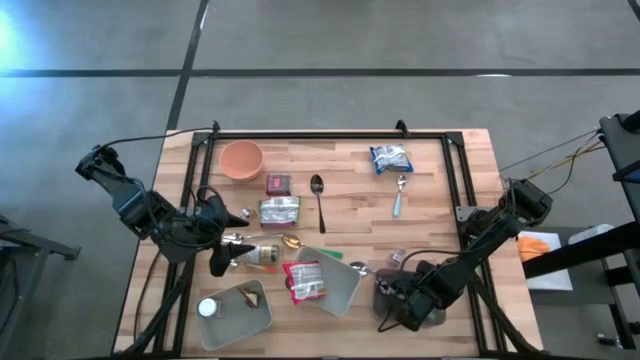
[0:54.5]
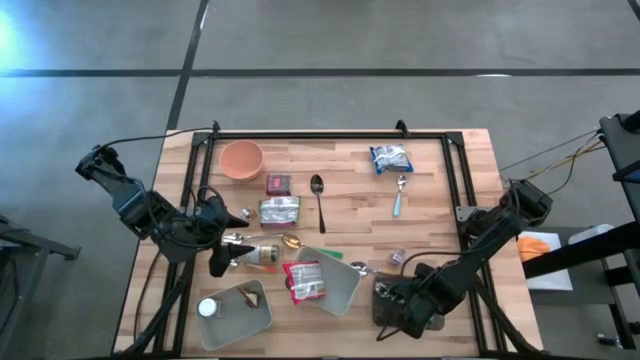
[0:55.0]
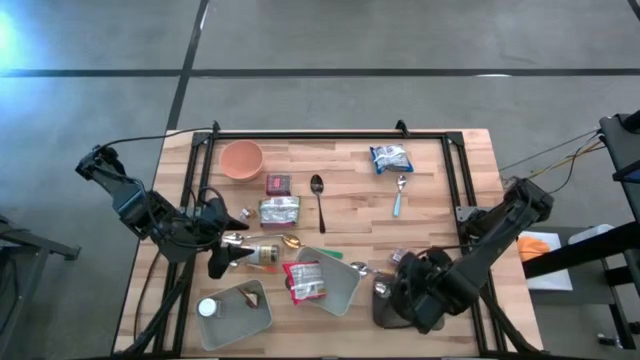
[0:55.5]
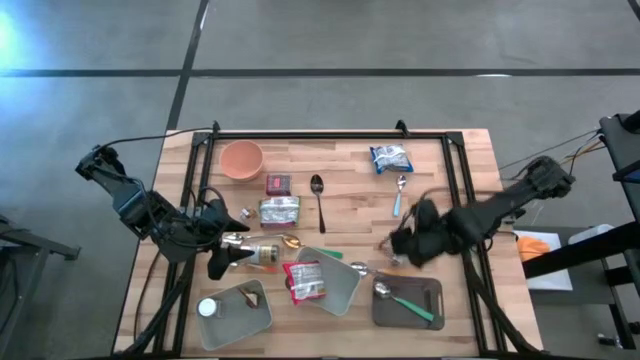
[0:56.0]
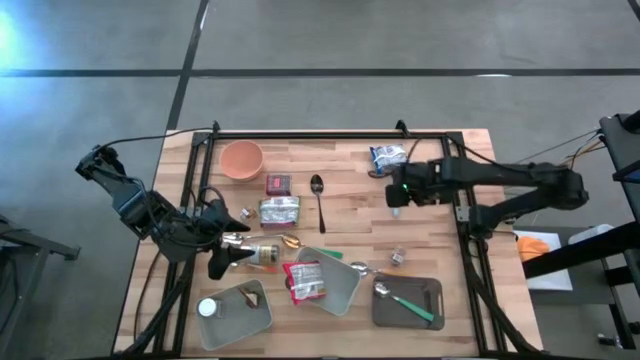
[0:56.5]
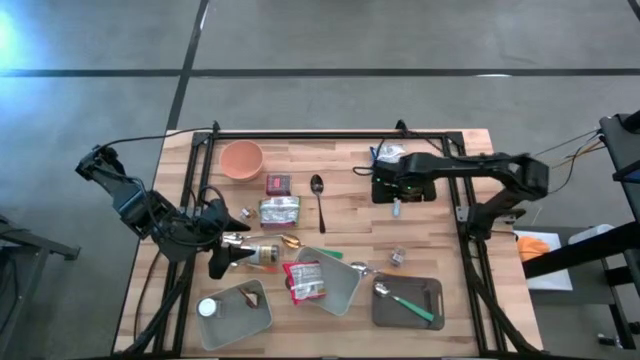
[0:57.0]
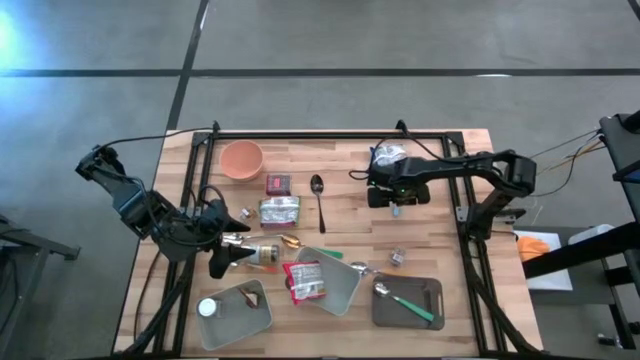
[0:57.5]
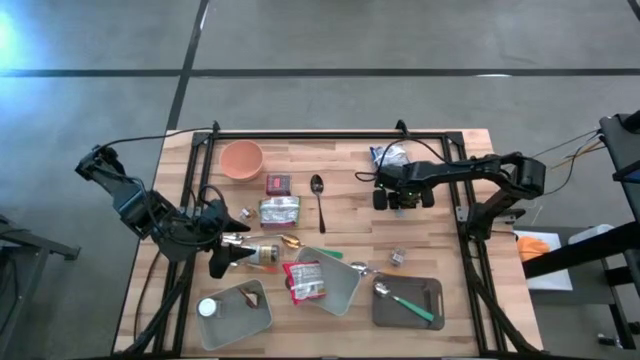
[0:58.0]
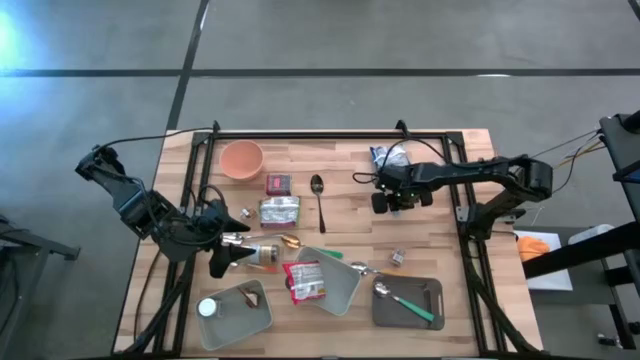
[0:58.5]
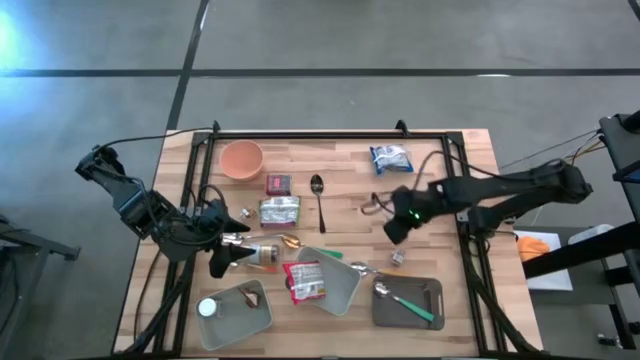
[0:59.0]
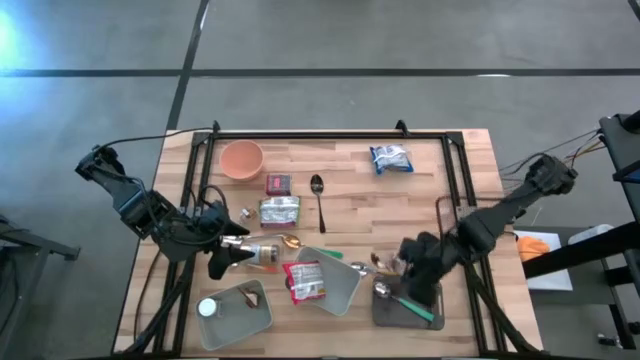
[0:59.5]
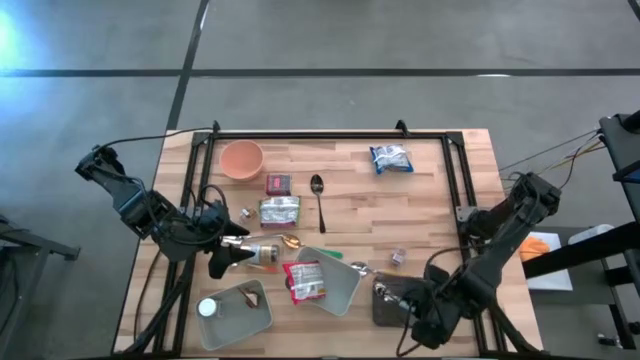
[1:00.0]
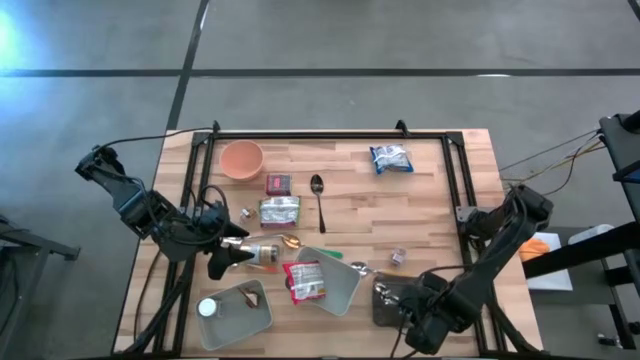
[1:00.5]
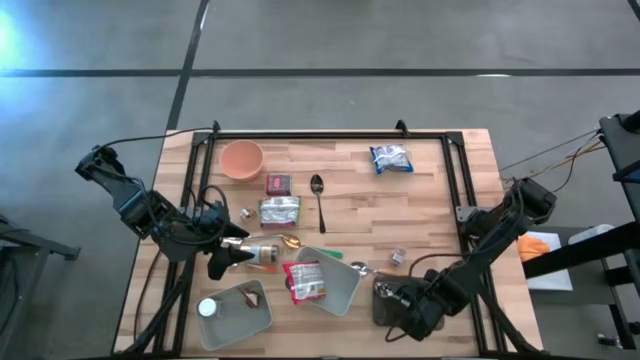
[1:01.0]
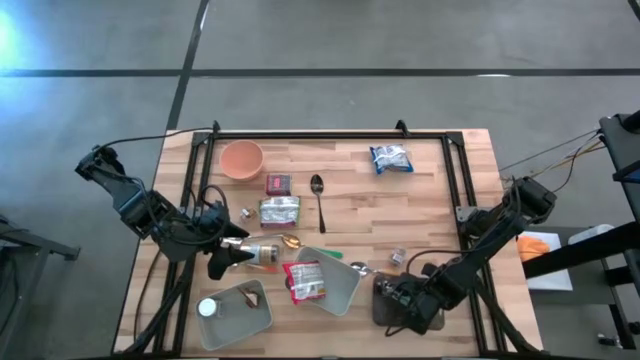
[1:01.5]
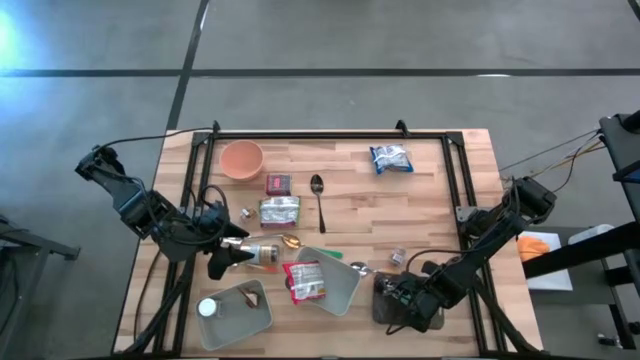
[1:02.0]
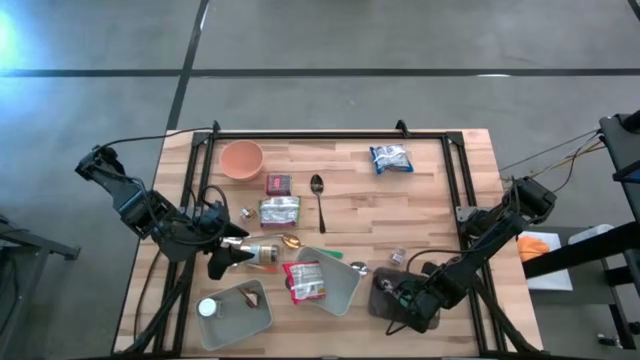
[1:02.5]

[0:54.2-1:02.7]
Put the light blue spoon into the black bin

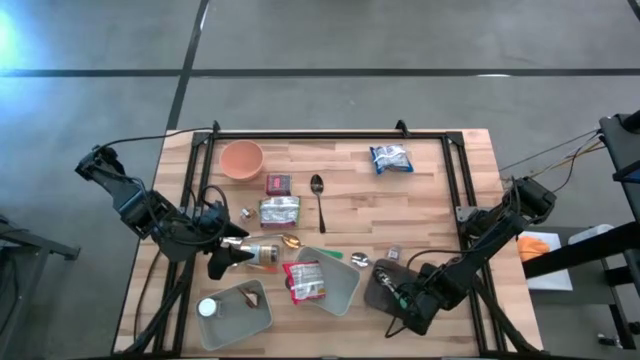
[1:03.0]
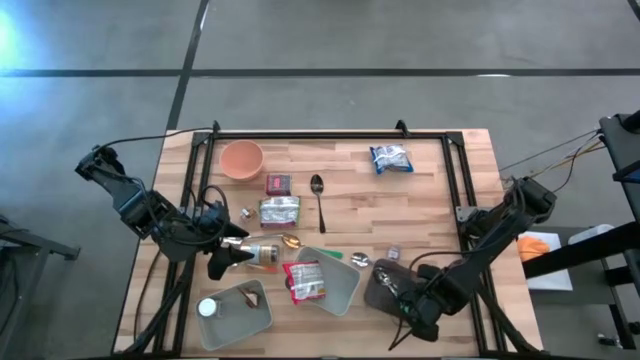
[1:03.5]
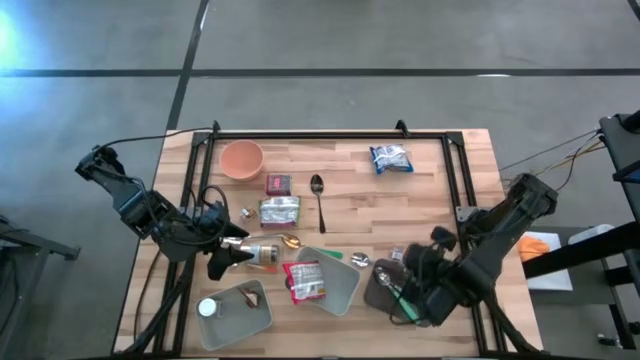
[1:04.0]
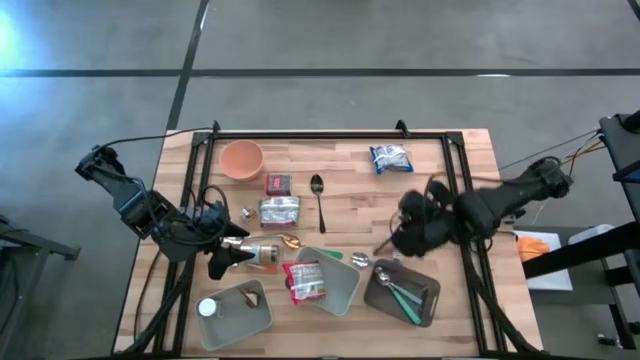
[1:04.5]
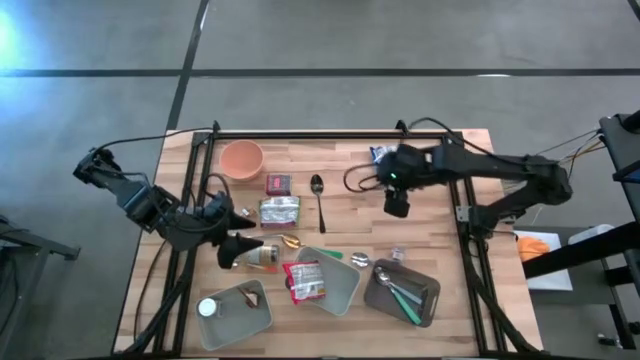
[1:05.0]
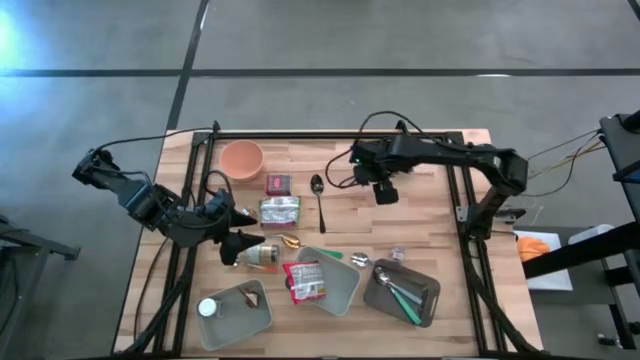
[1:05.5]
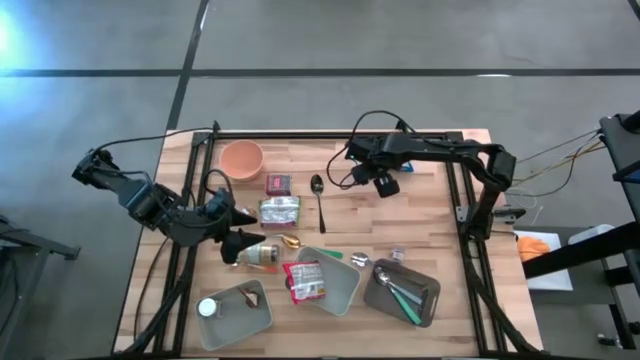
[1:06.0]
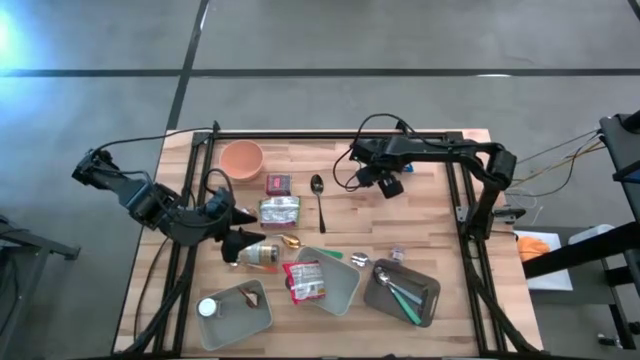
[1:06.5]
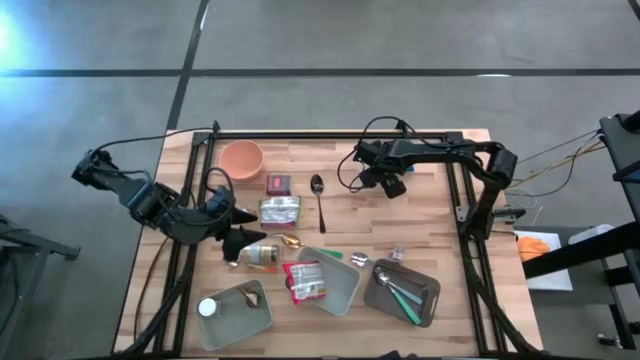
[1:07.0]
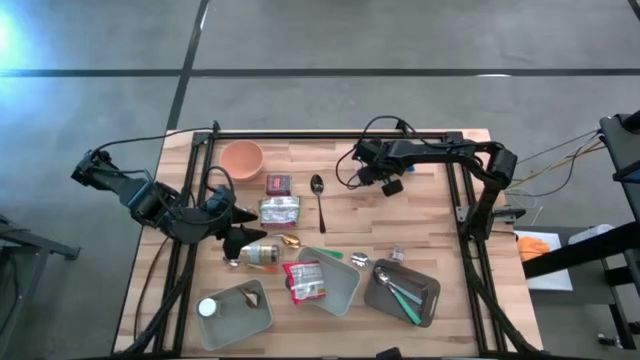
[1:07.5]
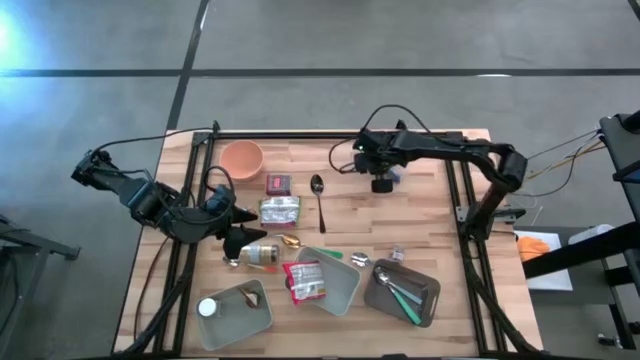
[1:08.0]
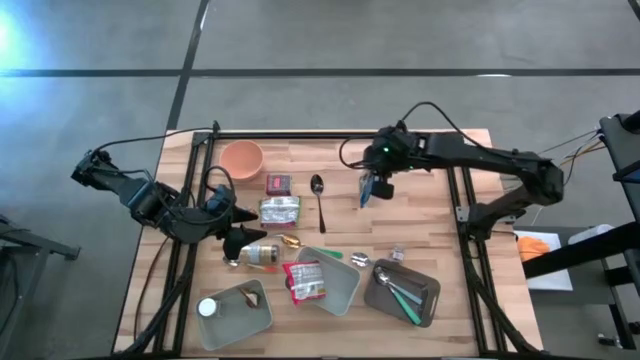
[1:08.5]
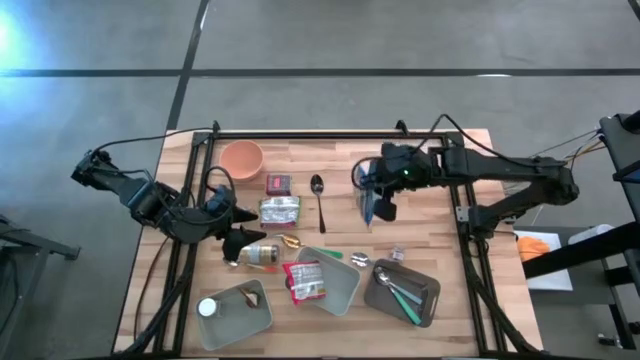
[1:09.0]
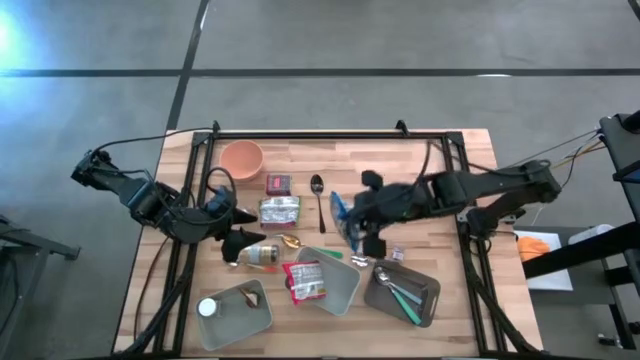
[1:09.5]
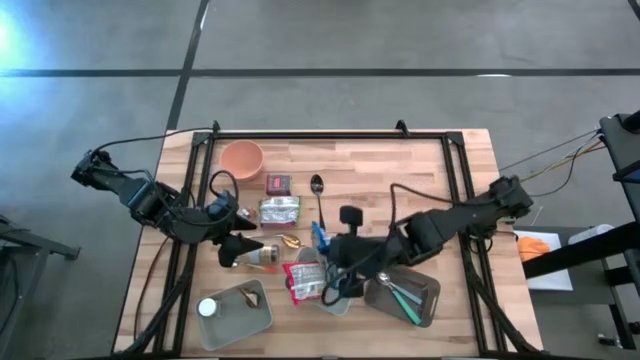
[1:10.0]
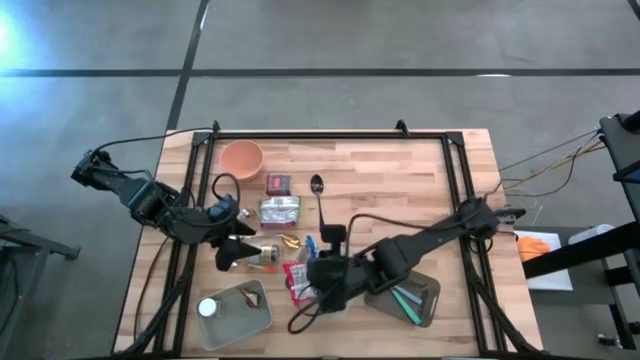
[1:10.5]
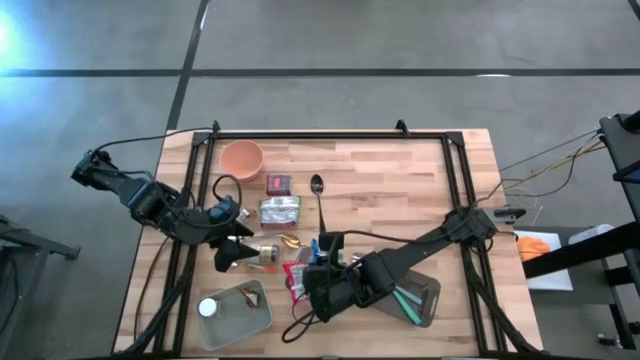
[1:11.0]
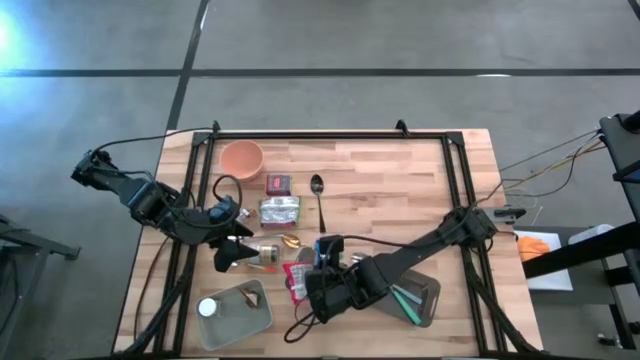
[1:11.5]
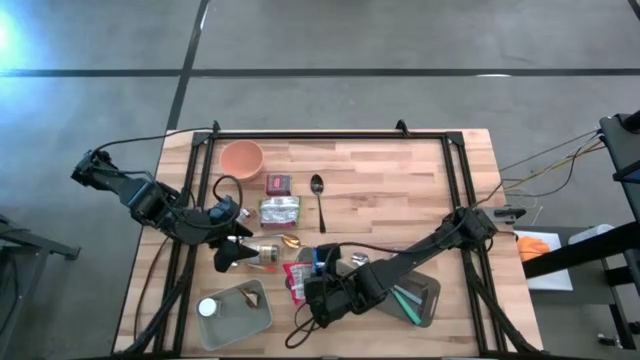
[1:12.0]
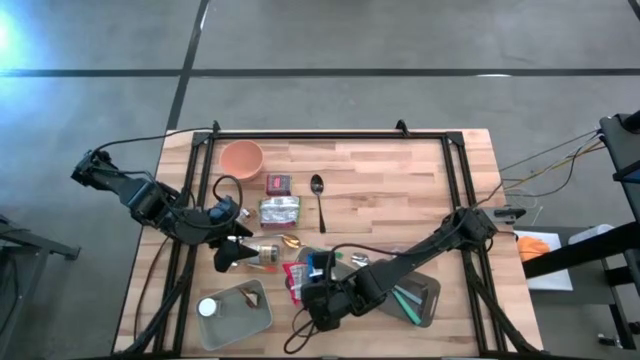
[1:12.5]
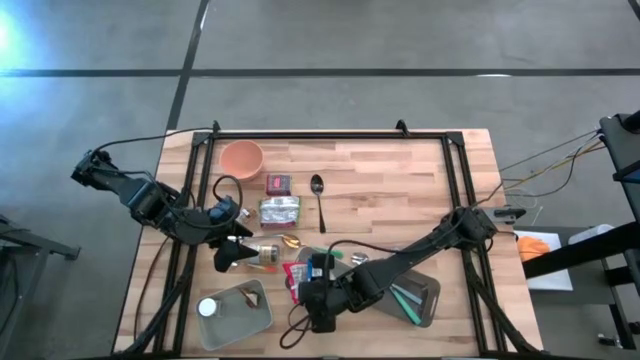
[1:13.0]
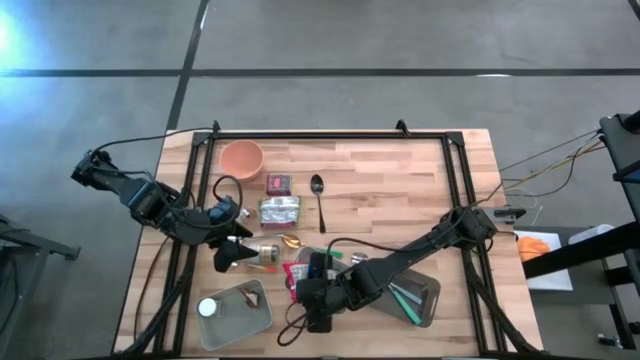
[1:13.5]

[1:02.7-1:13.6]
Put the blue noodle pack into the right gray bin
